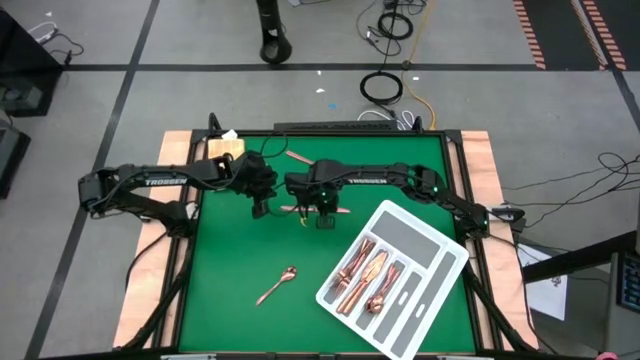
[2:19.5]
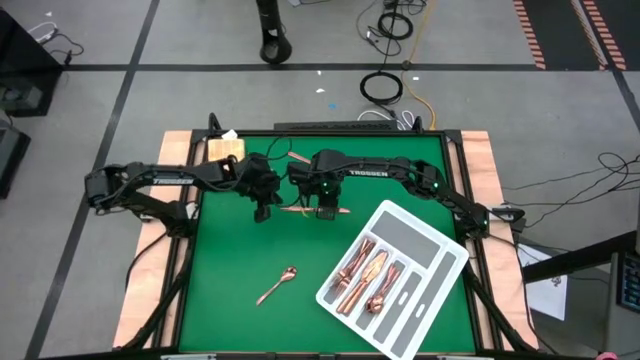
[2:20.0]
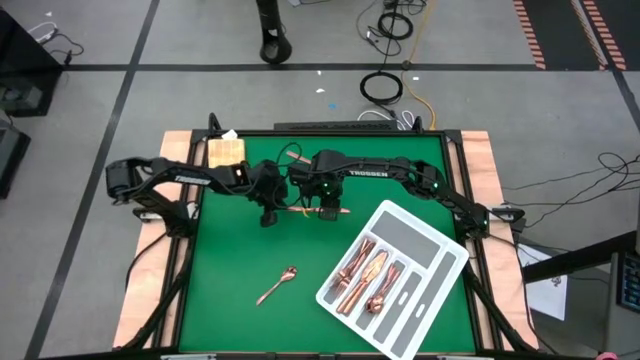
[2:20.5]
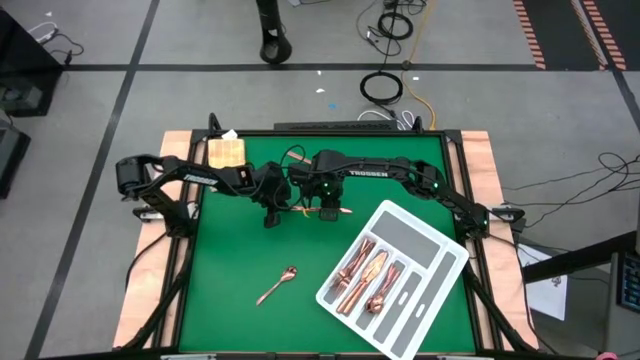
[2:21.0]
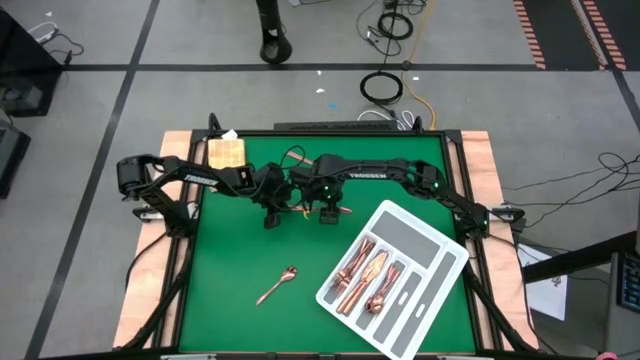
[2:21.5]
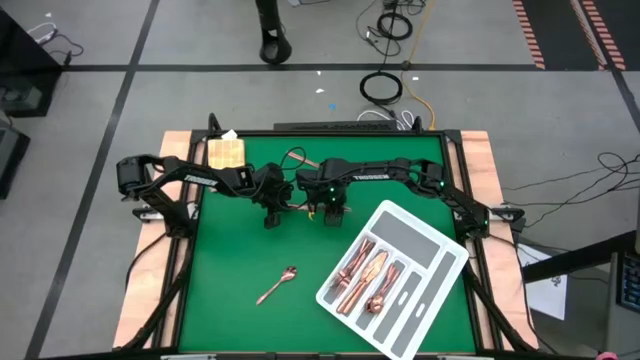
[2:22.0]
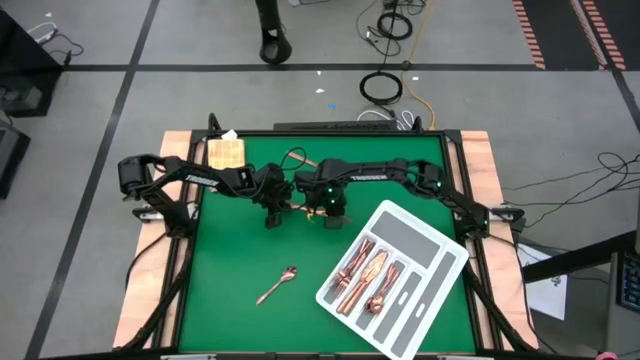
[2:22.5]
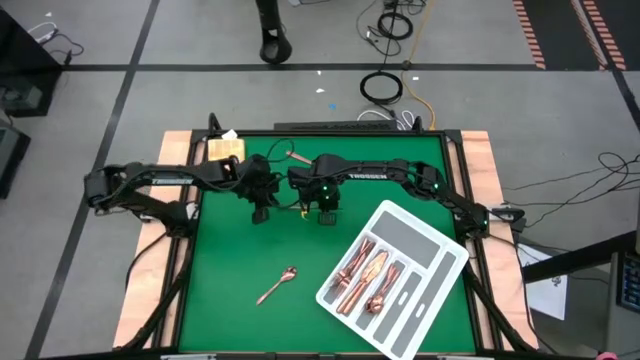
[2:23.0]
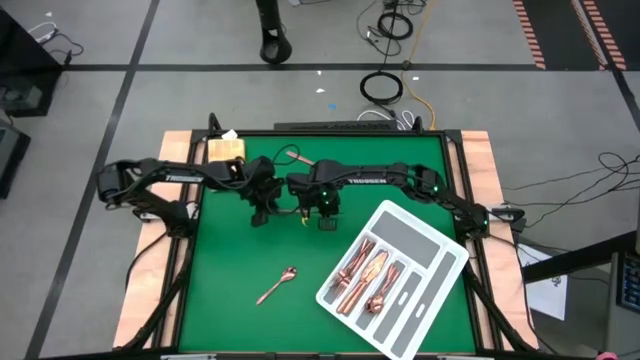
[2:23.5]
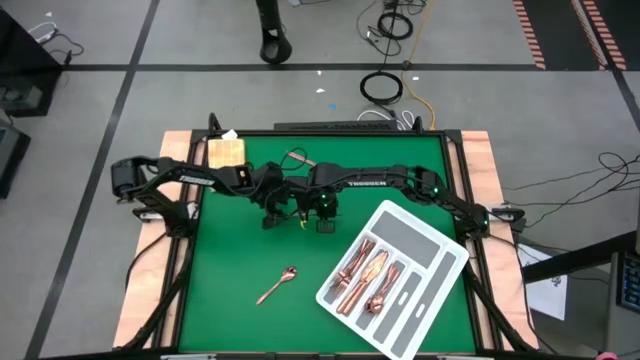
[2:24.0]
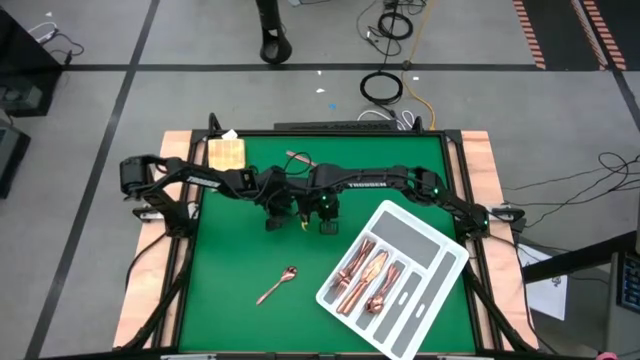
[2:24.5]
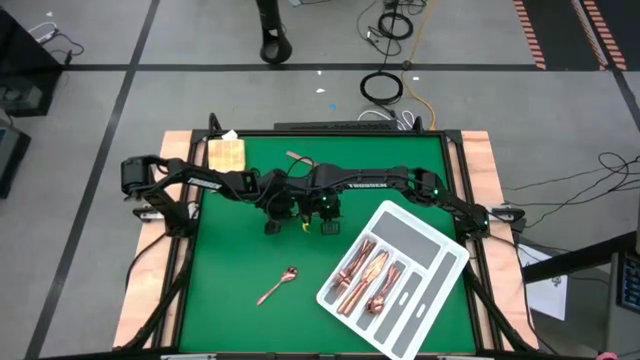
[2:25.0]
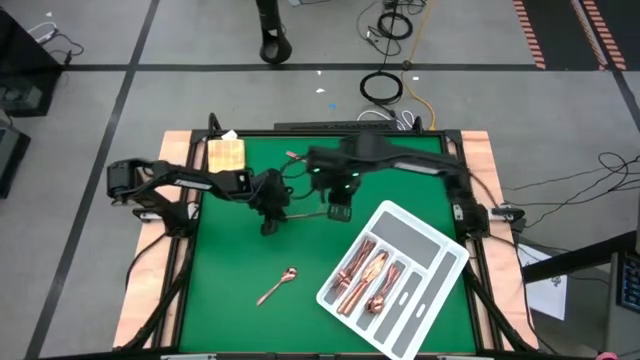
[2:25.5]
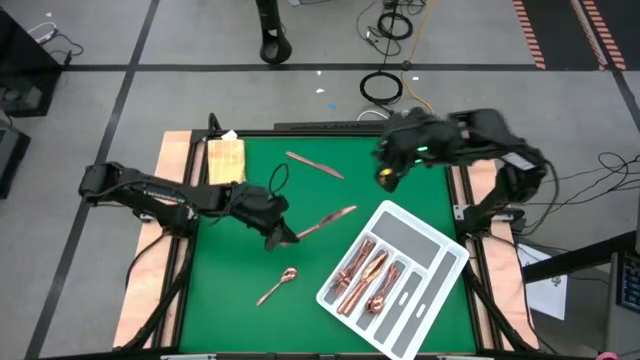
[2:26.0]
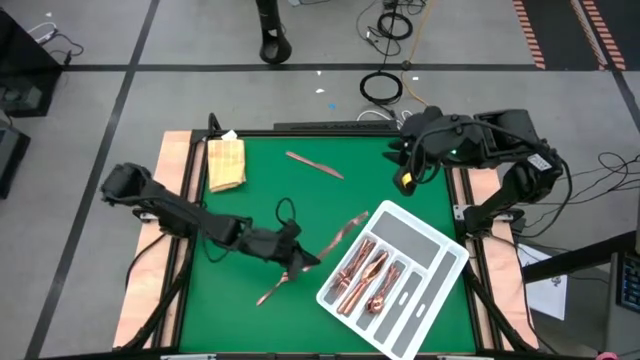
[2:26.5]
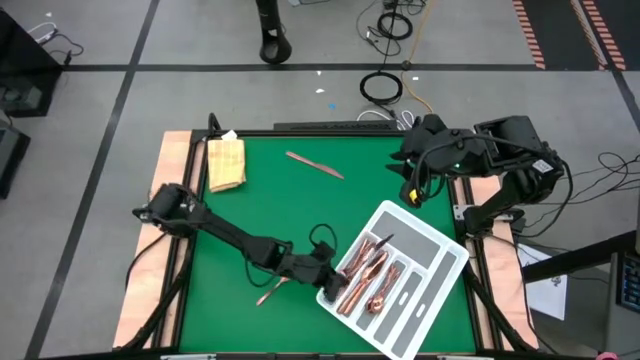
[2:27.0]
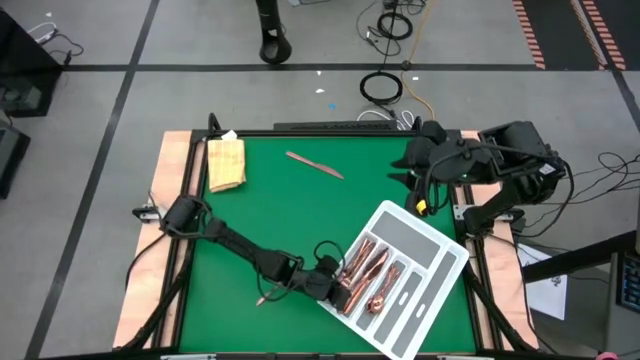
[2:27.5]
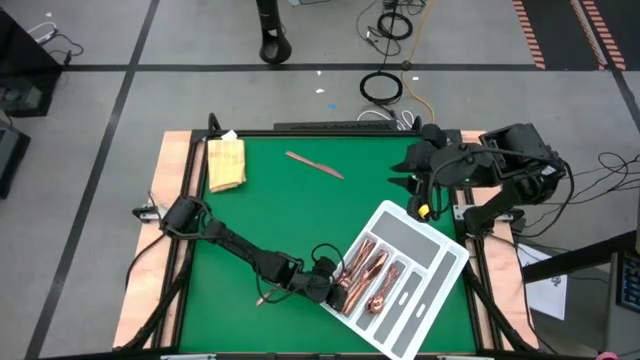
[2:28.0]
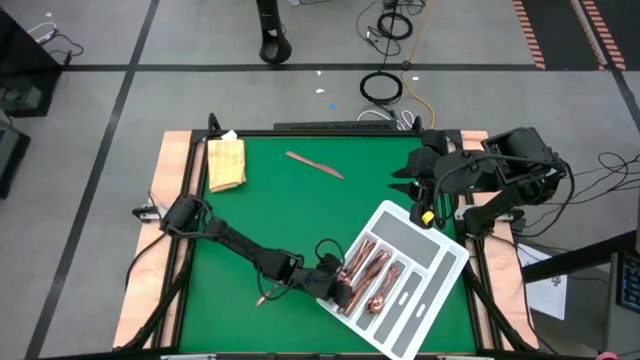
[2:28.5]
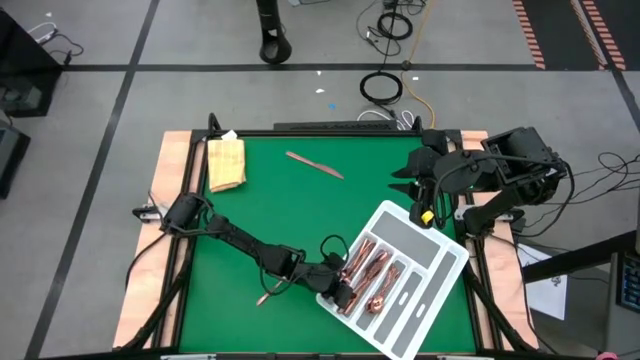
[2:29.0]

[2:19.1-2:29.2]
Task: Sort silverware
Put the bronze knife into the silverware tray

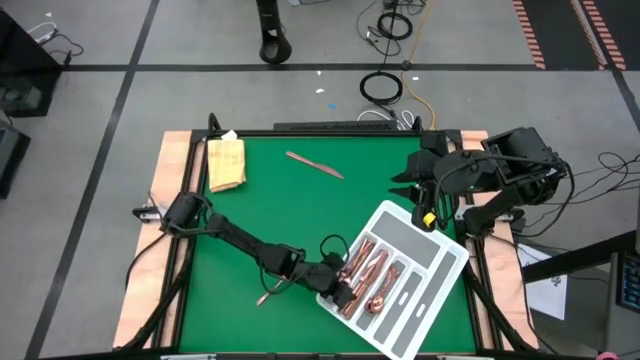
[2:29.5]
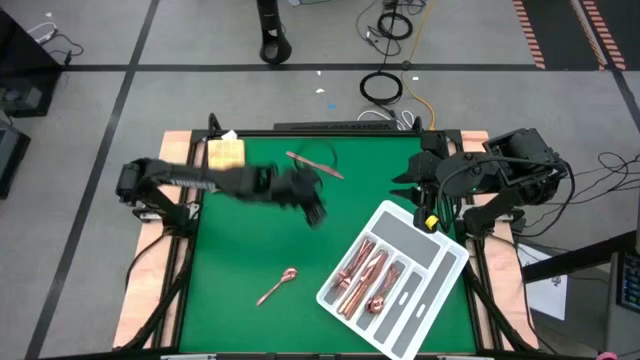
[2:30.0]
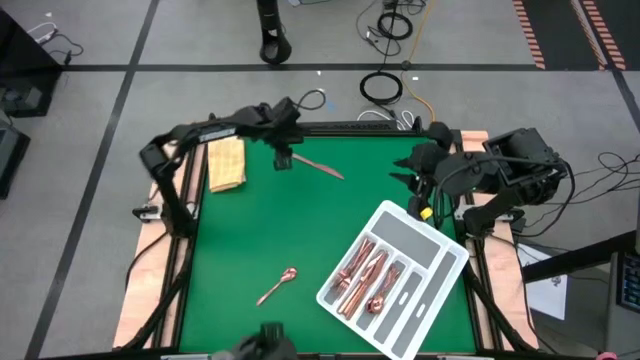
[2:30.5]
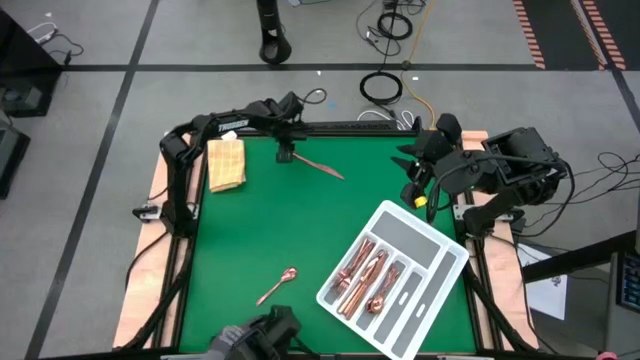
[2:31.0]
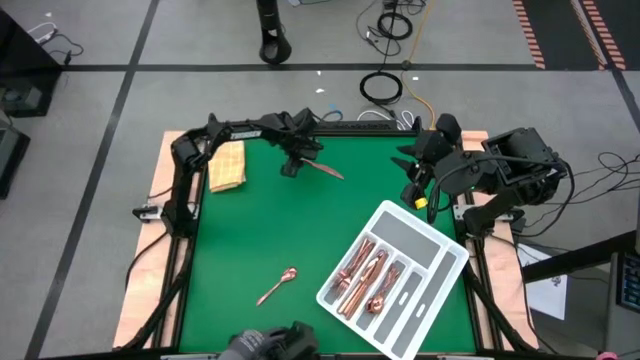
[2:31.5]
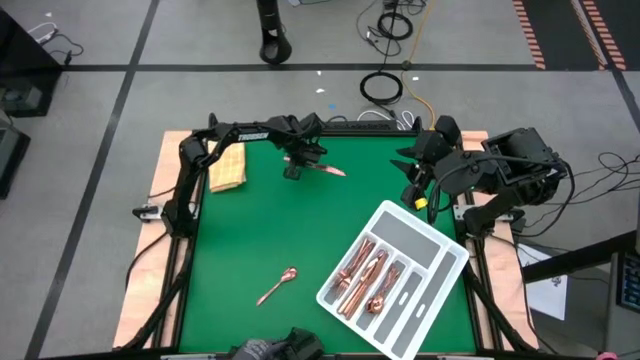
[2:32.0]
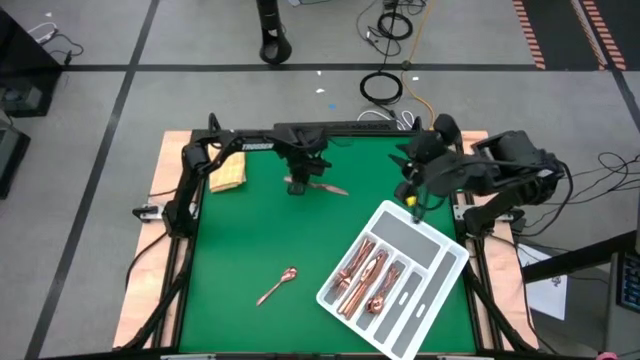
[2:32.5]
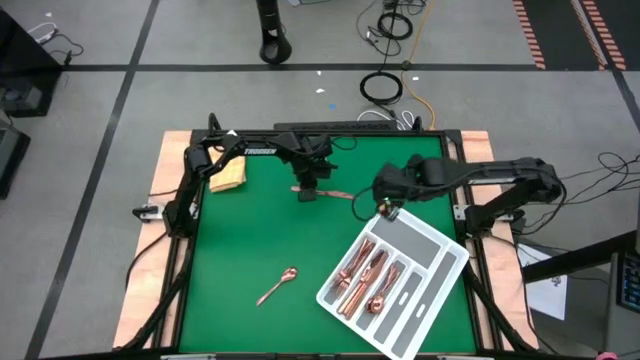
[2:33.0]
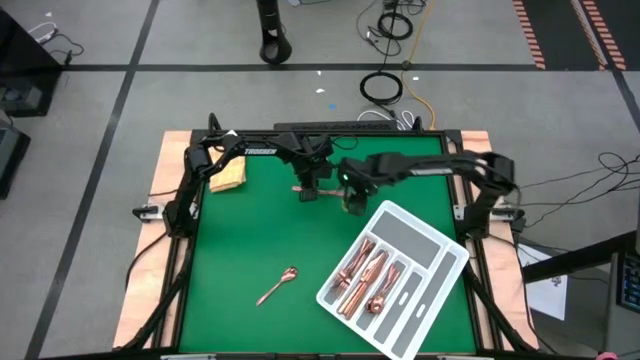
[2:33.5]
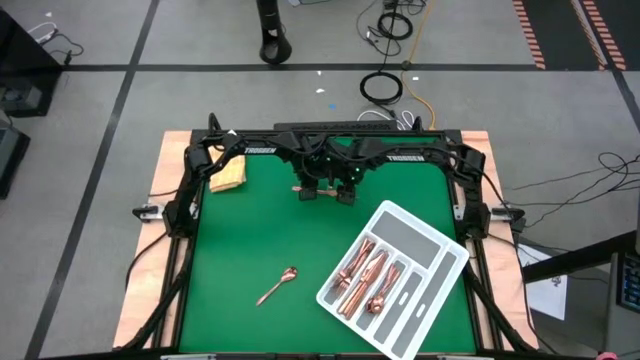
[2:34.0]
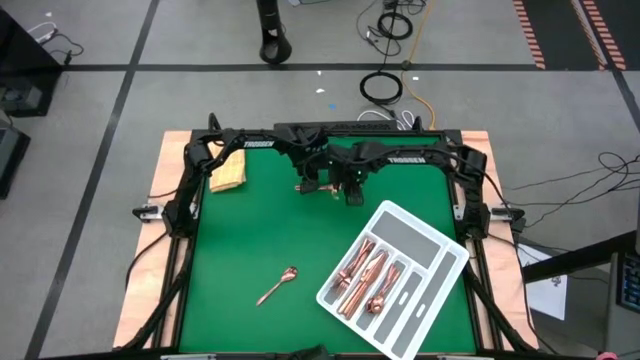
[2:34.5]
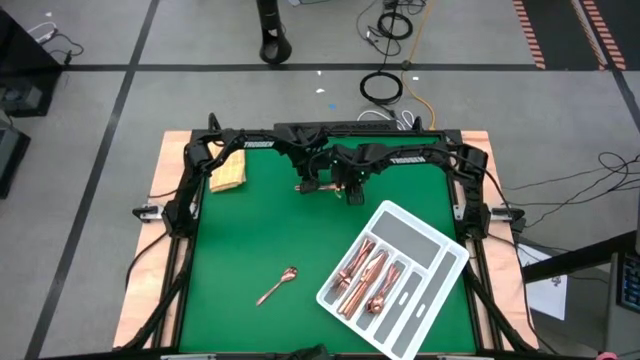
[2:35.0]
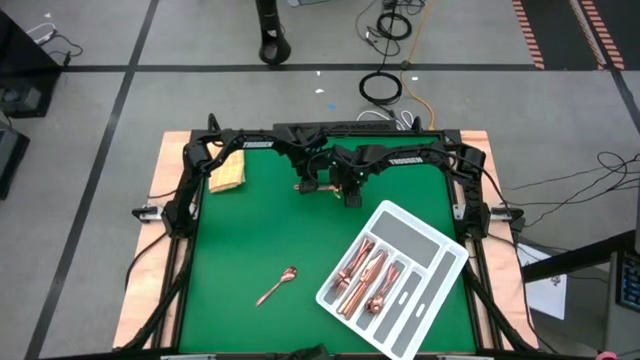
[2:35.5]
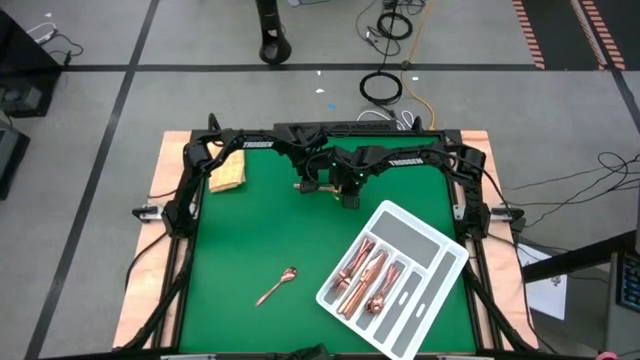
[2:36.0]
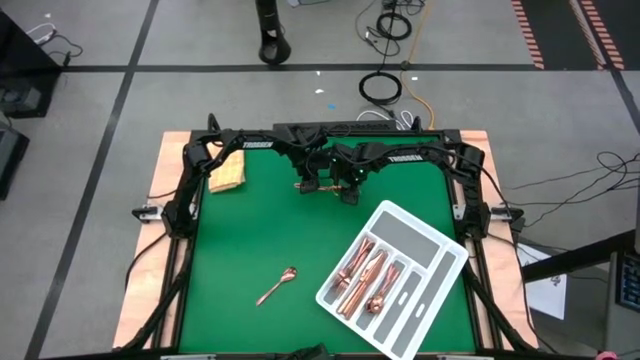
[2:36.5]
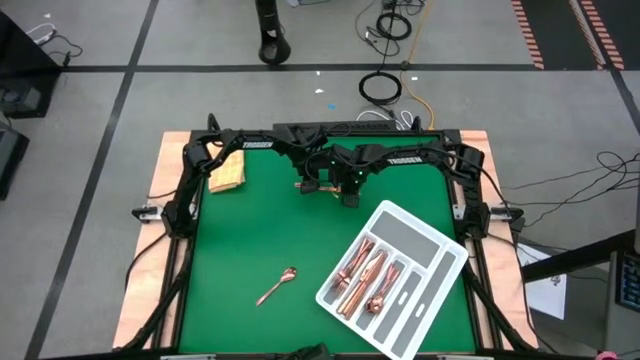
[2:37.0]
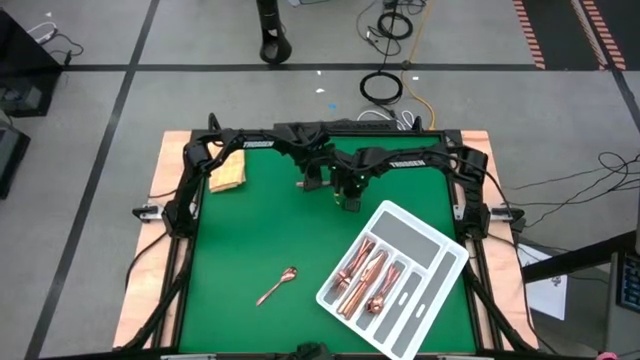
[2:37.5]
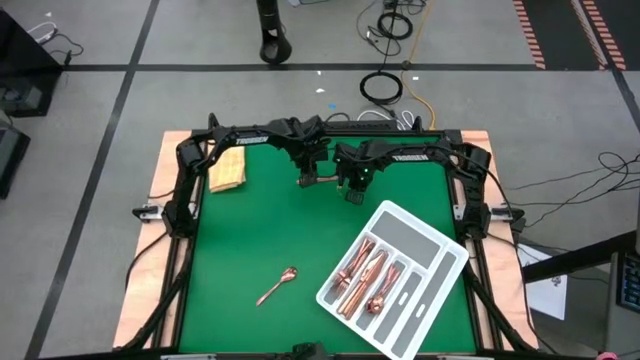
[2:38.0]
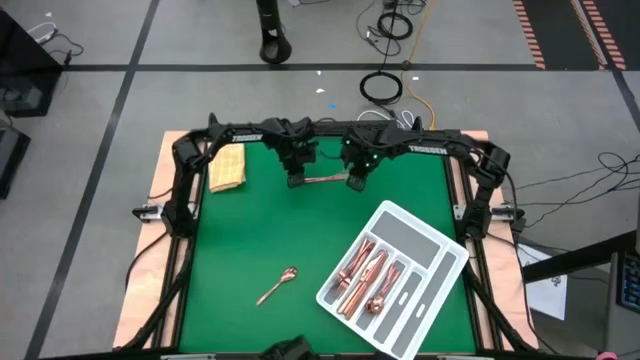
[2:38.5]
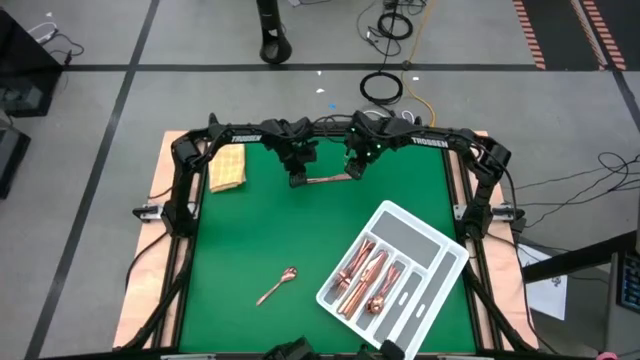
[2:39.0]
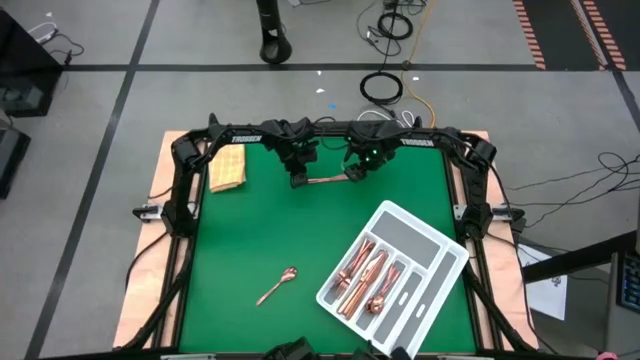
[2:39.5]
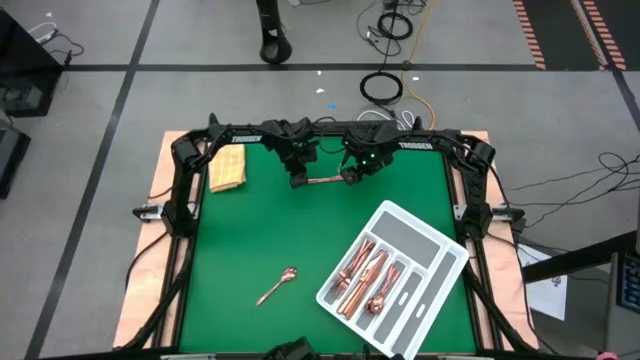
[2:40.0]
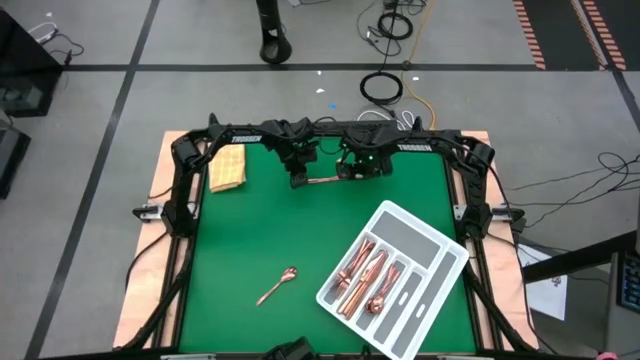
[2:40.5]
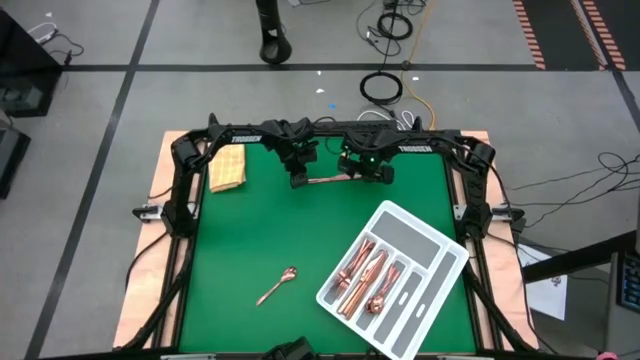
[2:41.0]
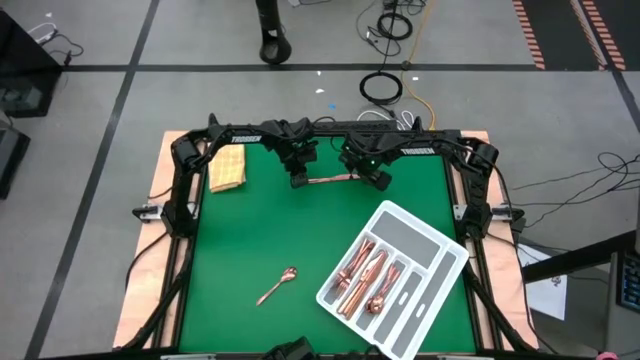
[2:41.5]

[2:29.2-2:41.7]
Put the bronze knife into the silverware tray

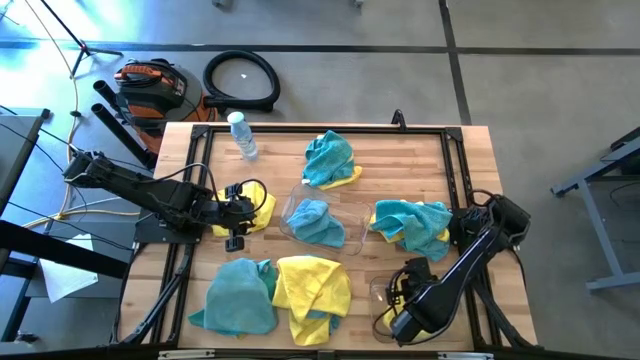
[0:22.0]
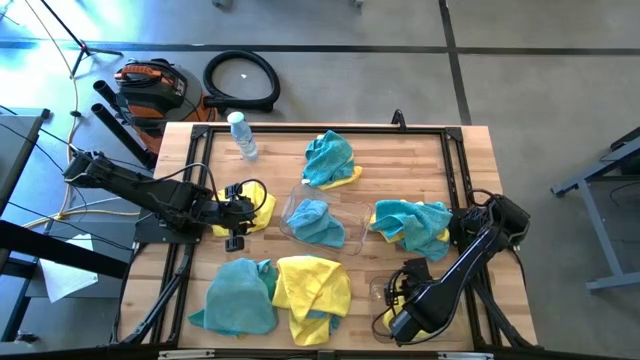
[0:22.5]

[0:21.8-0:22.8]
Task: Sort microfiber towel by color & place in baskets
Put the yellow towel in the bottom transparent bin
